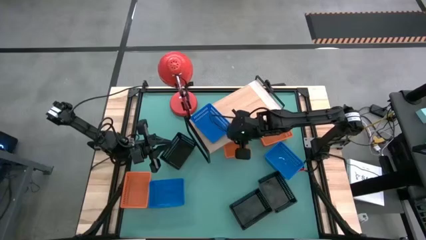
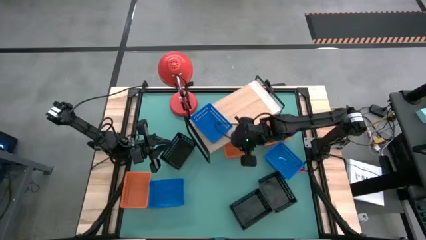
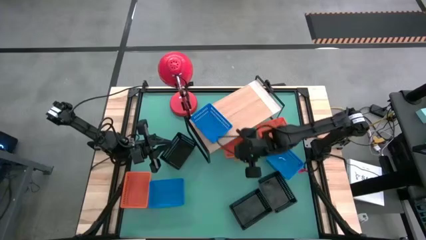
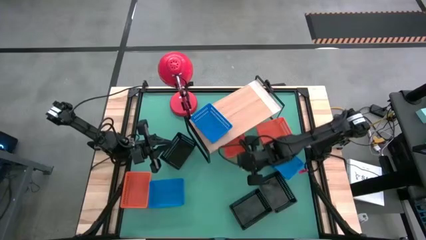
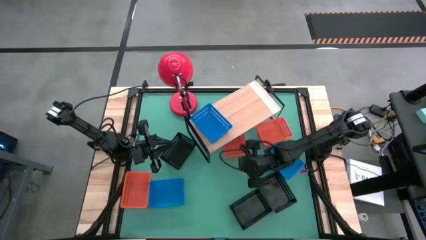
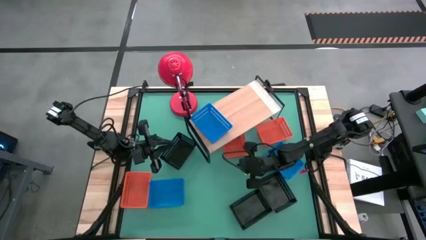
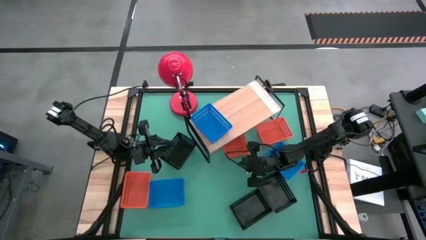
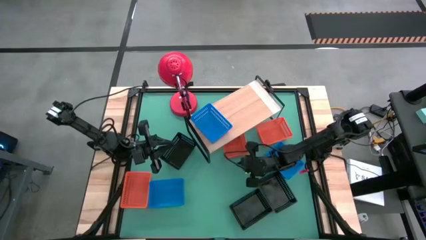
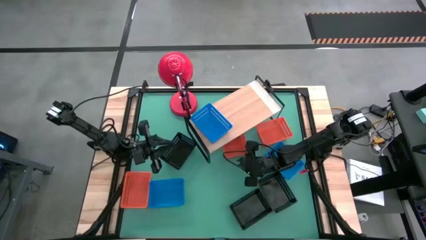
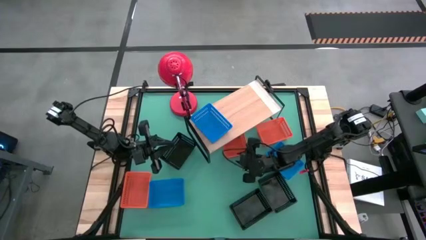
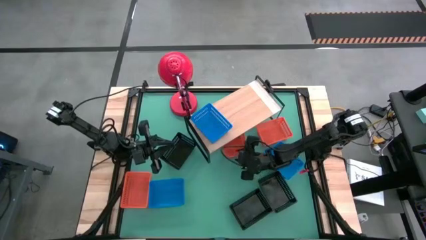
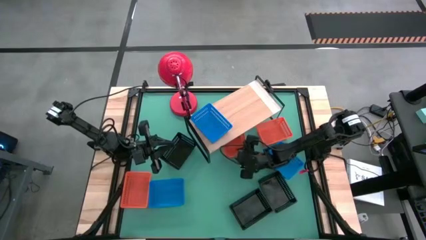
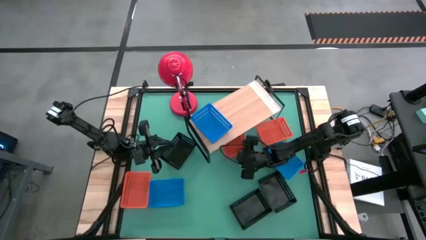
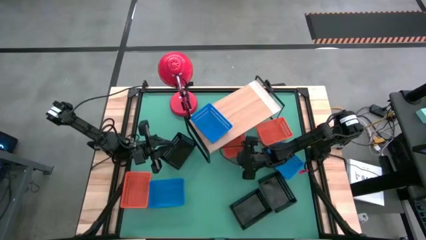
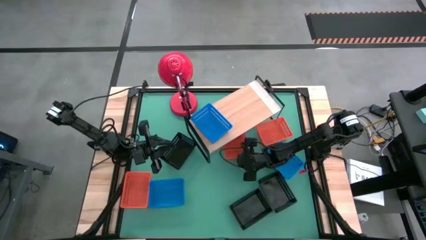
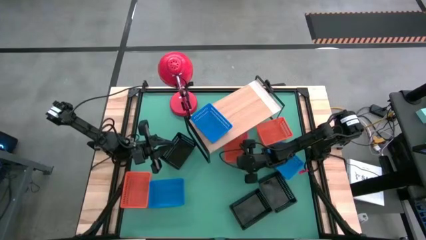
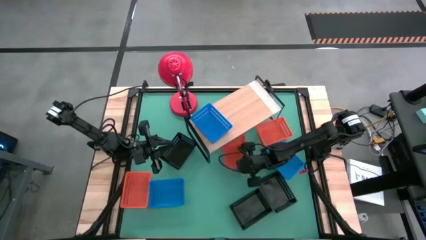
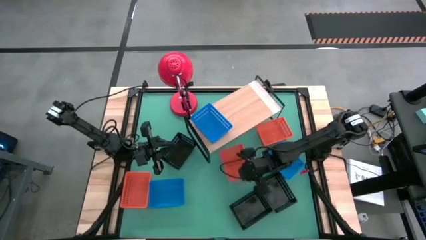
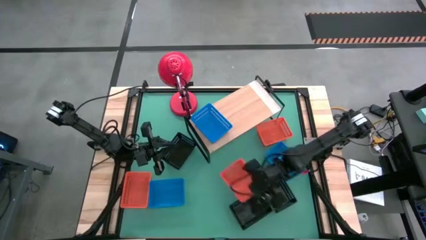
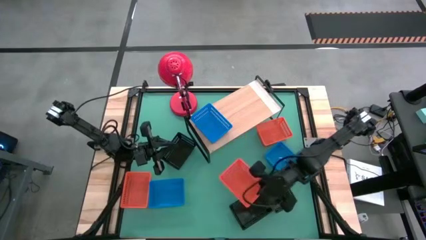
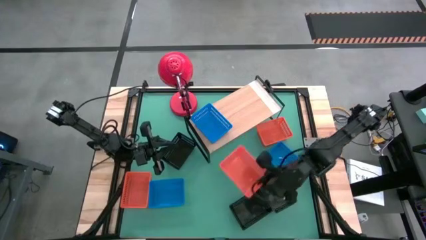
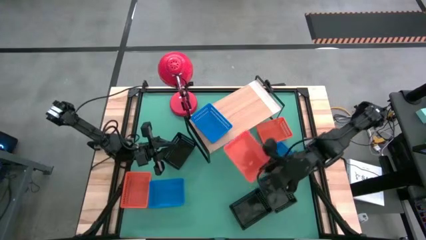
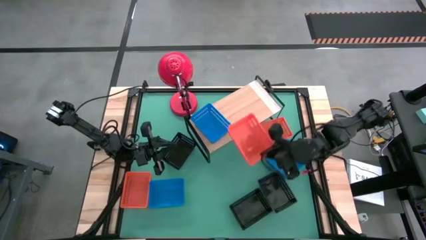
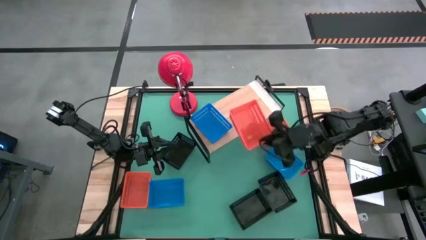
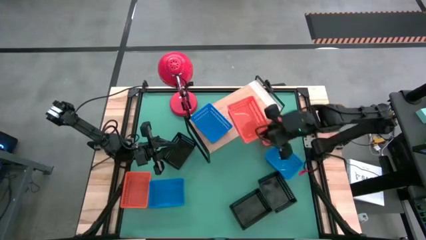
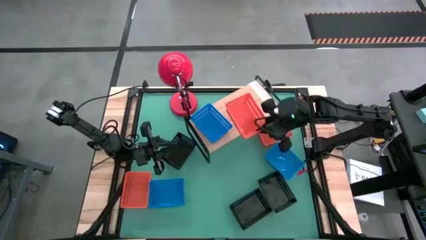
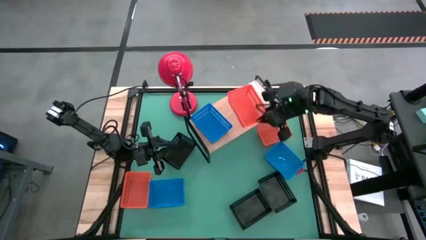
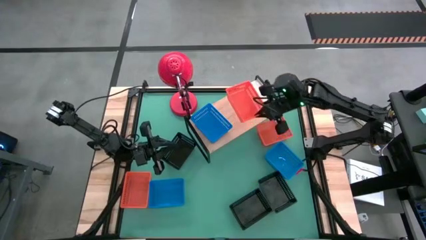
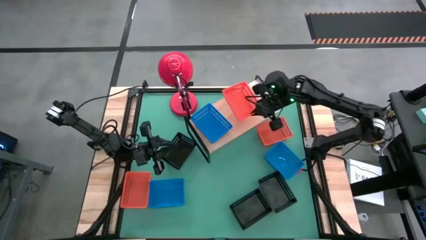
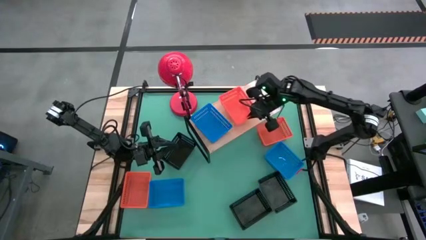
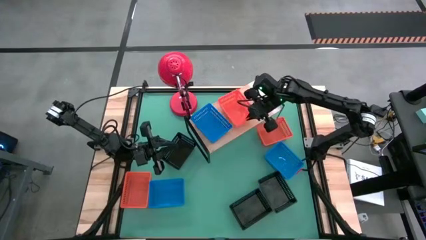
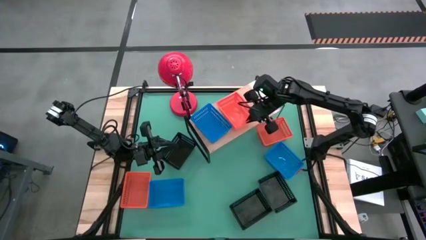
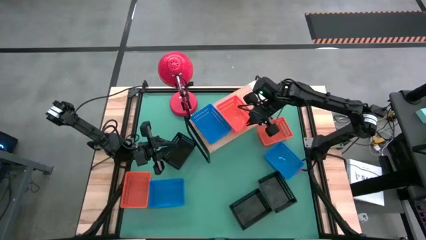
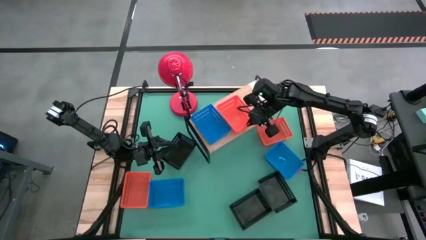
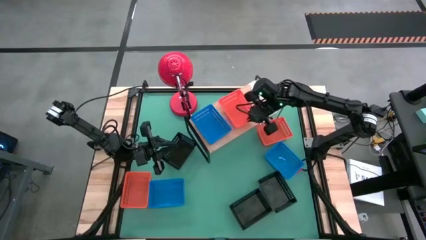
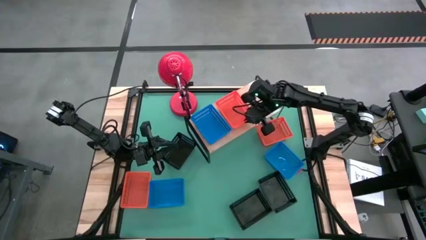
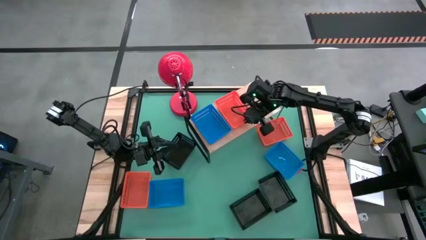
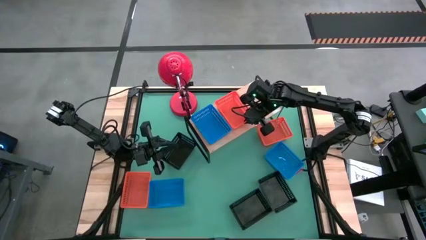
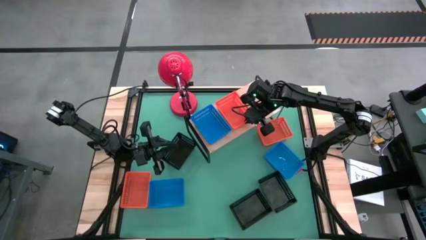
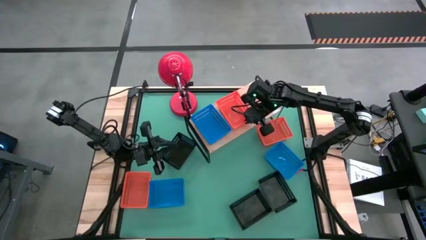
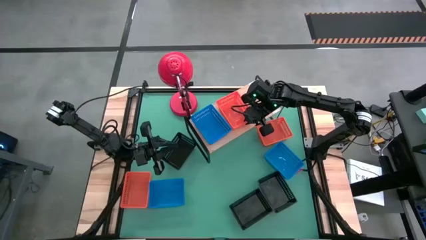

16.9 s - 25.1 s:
Task: Stack baskets on shelf by color
Put the middle orange basket on the shelf

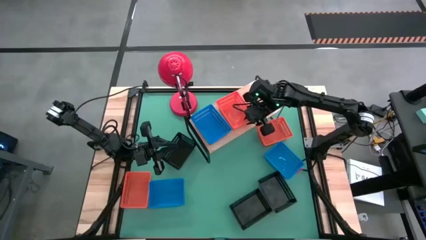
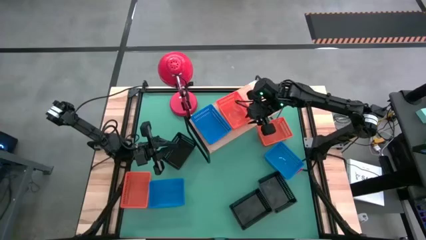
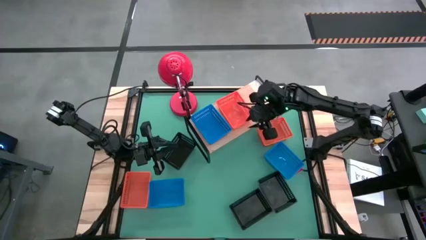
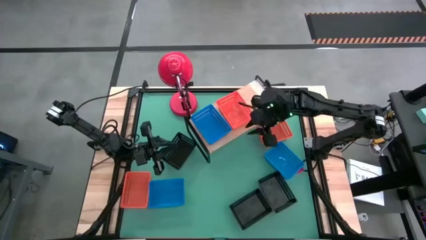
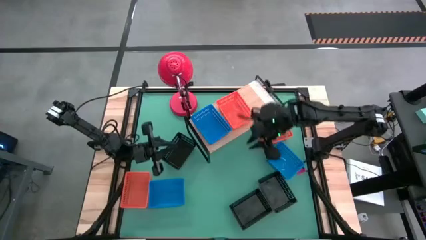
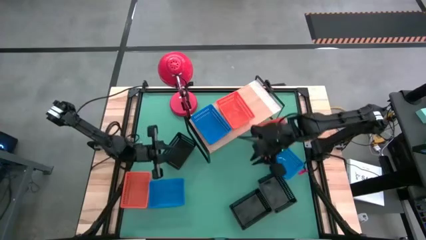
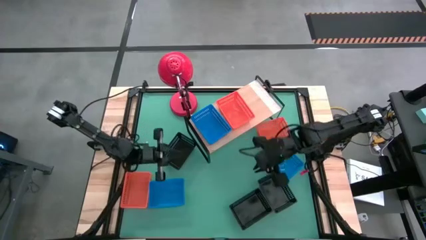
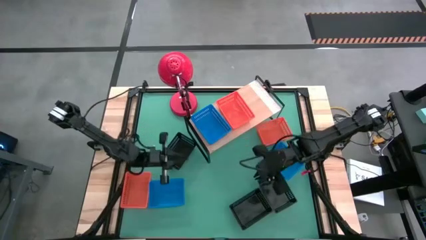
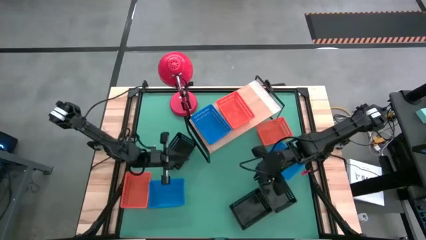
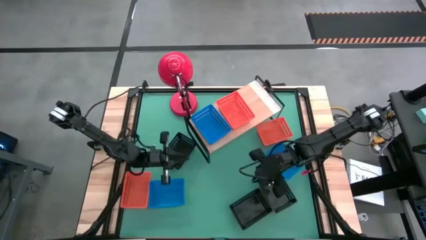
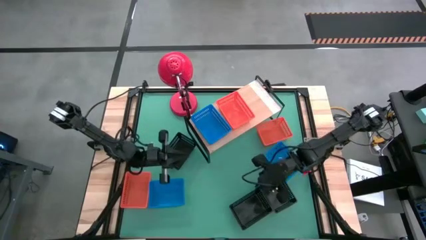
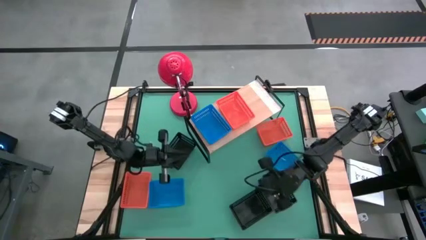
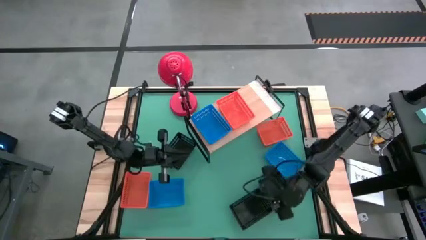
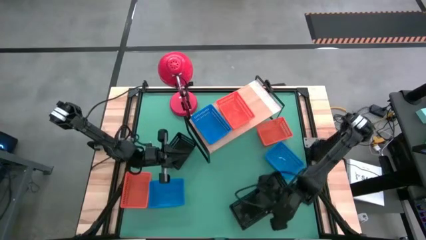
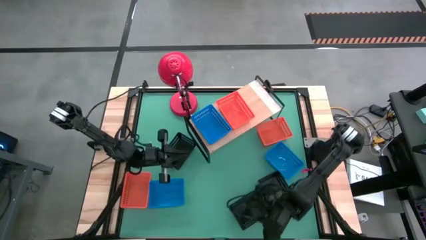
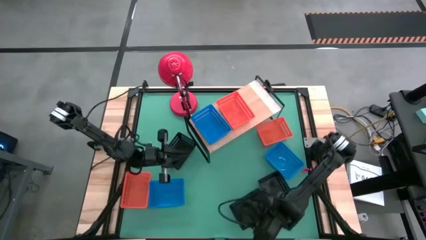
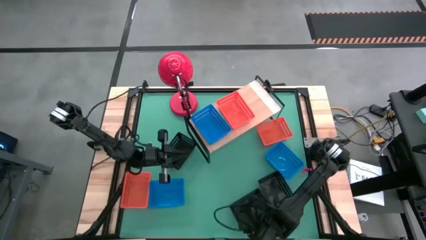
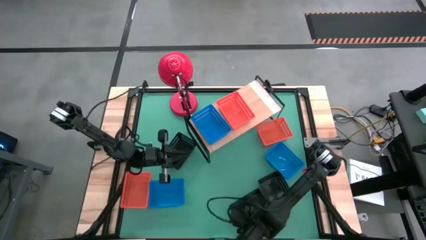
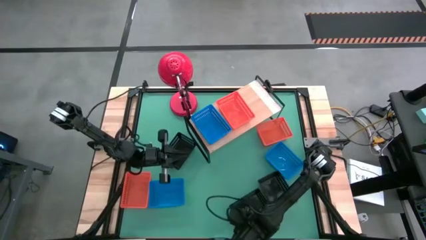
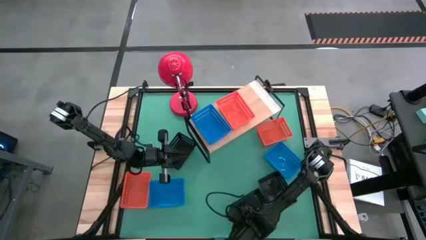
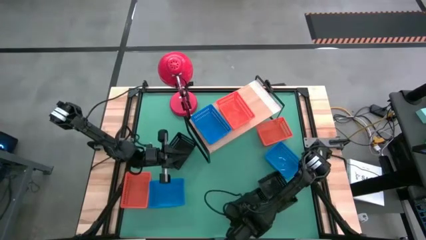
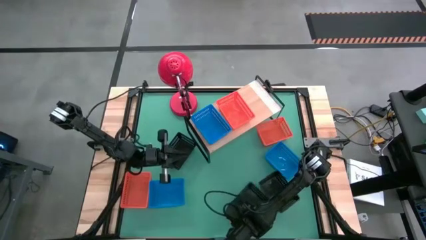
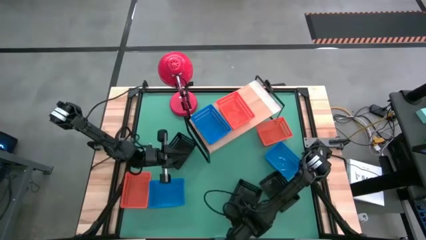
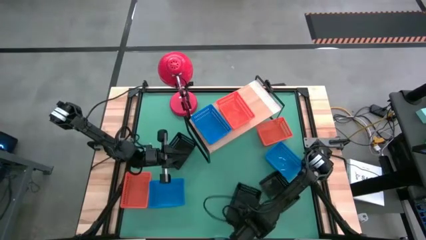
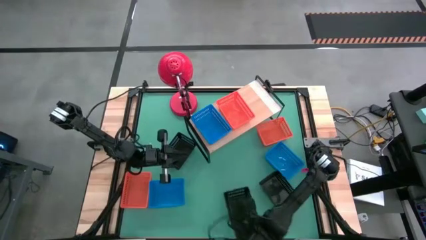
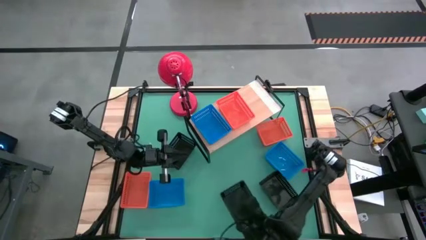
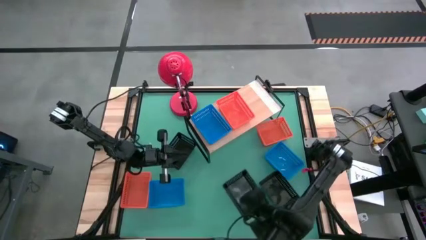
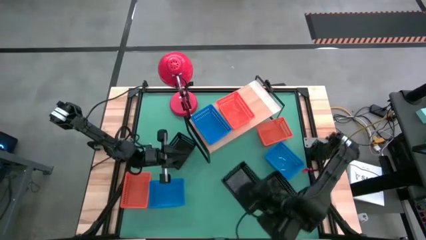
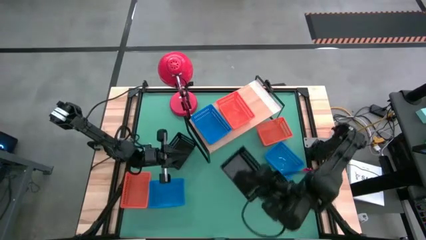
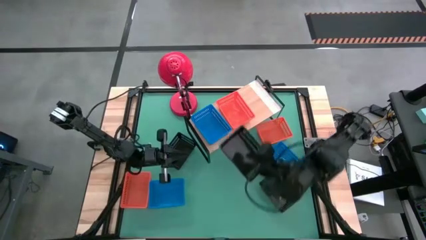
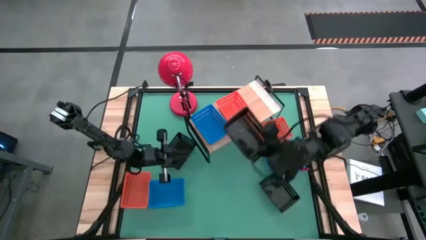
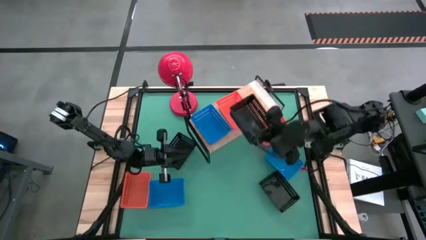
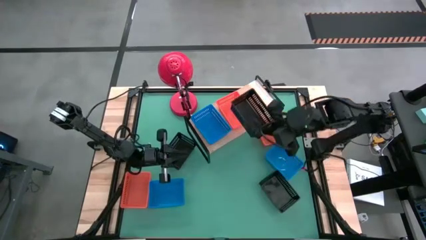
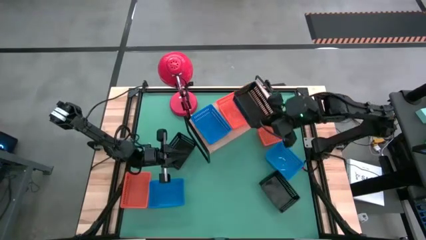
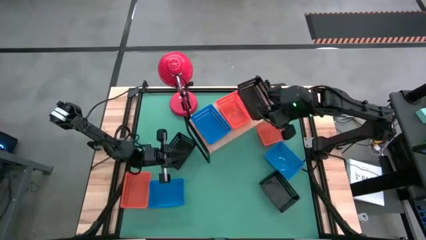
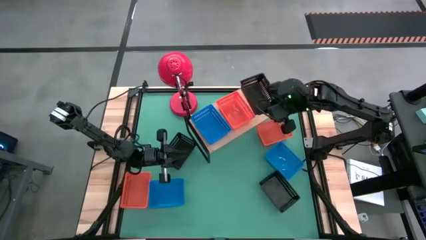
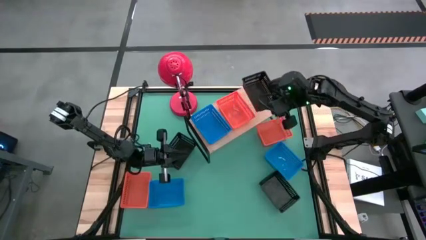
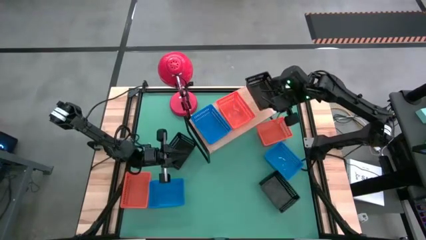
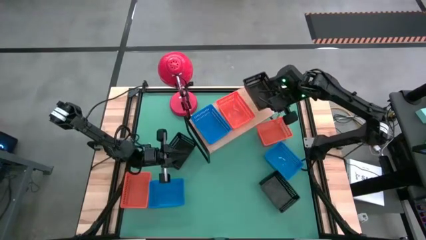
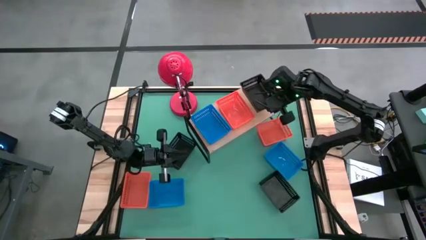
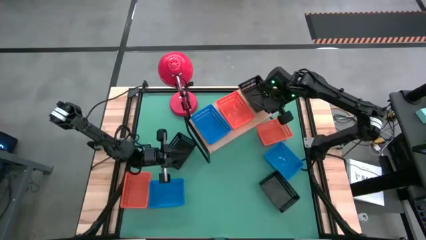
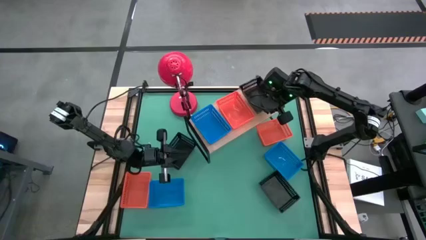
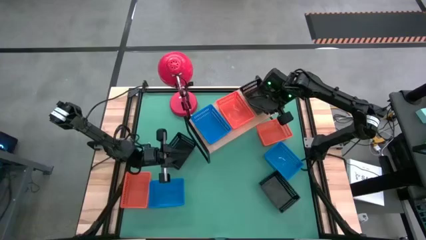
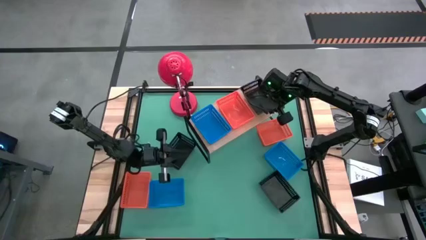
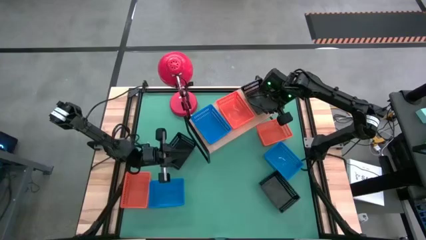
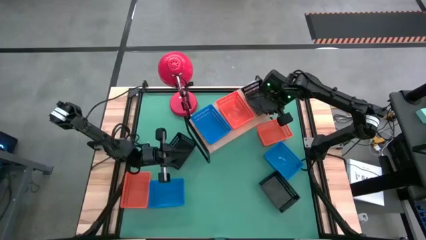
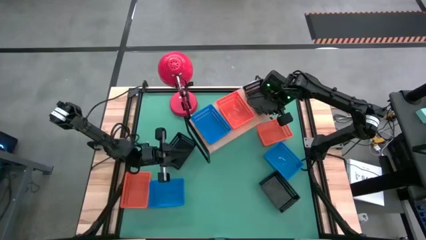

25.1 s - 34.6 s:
Put the bottom left black basket on the shelf
